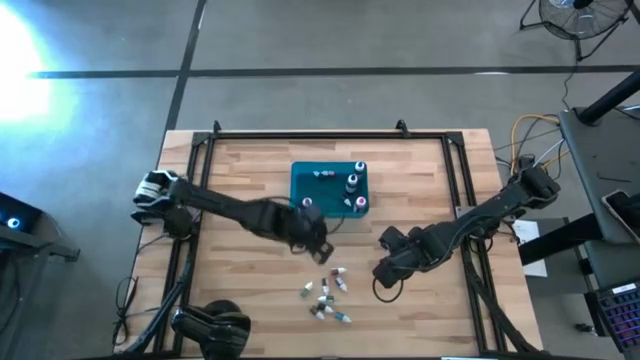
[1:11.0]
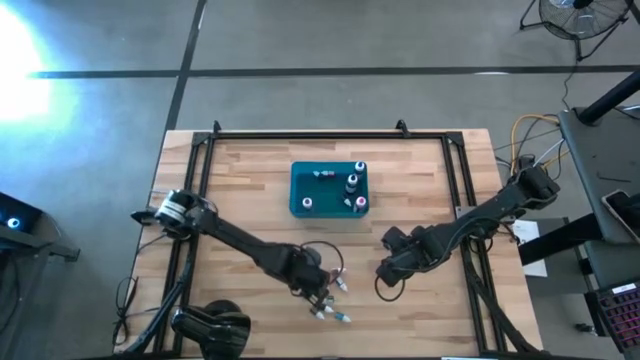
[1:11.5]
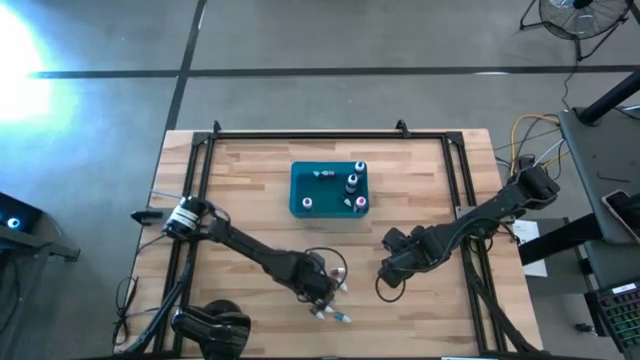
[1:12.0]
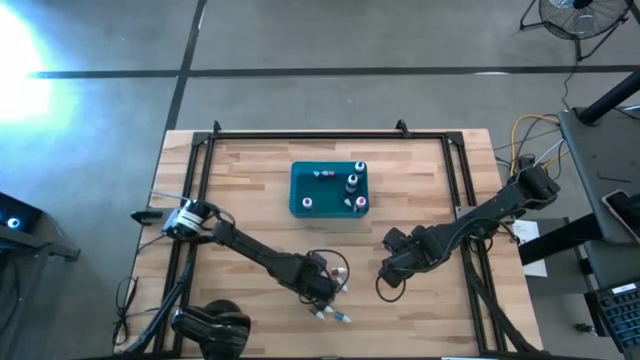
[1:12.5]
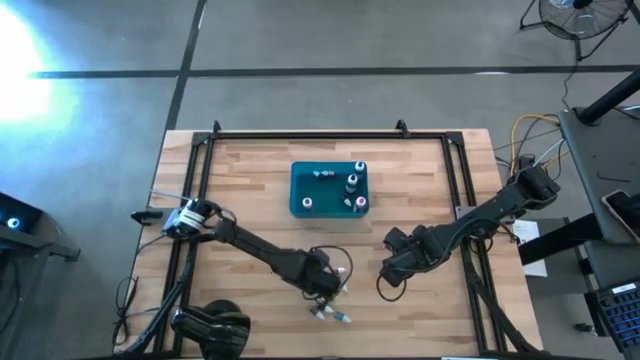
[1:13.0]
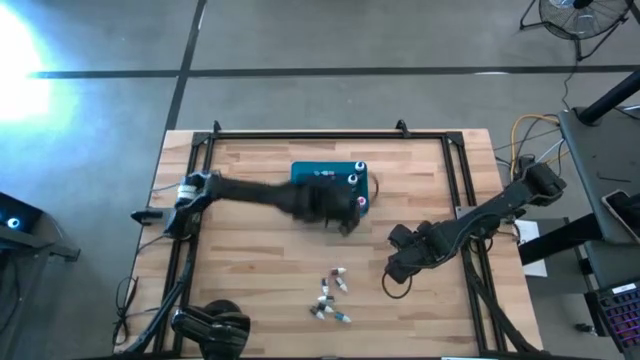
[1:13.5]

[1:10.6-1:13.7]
Task: Pick & Place food coloring
Put the green food coloring bottle in the blue bin

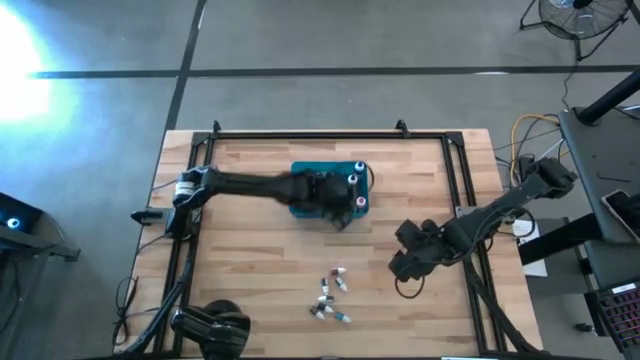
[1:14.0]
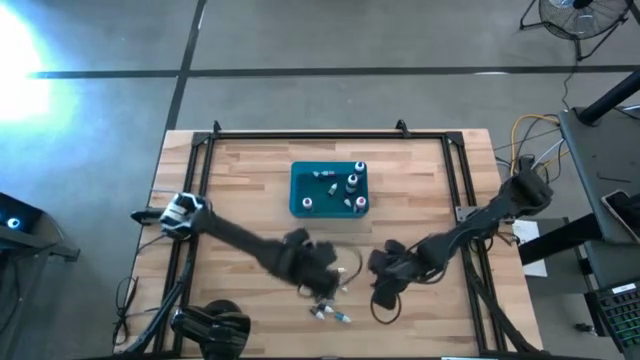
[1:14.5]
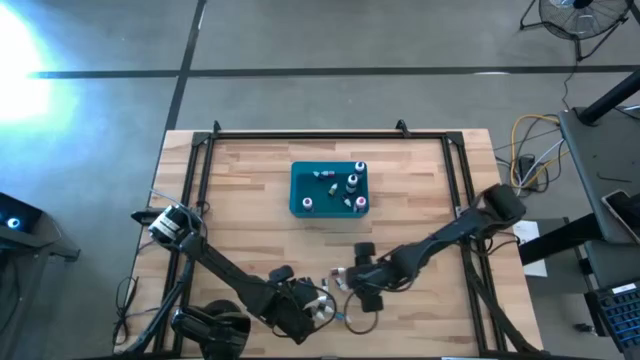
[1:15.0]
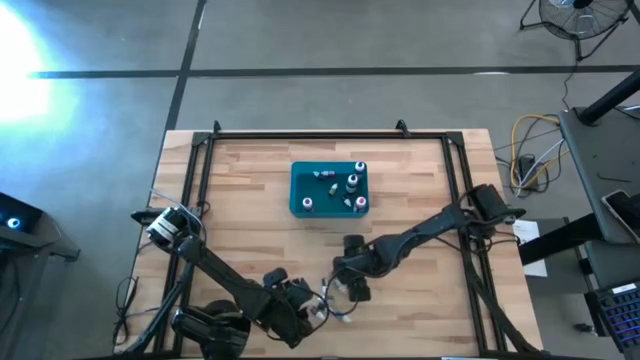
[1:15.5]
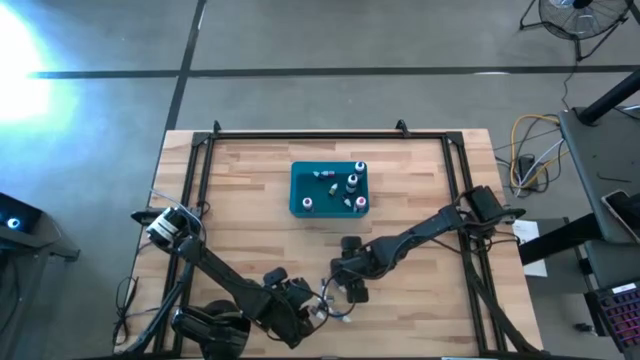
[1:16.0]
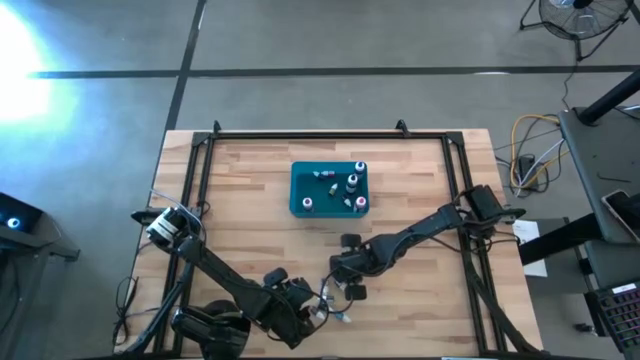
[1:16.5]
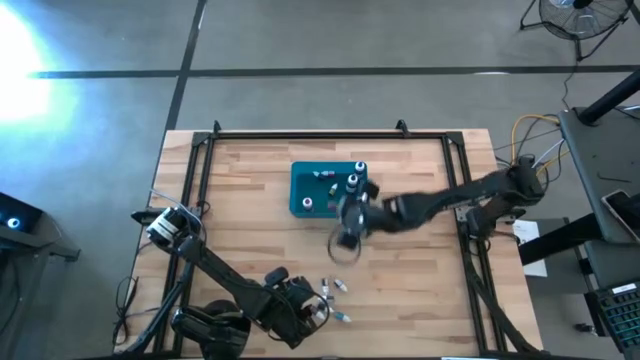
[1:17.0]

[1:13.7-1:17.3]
Put the red food coloring bottle in the blue bin

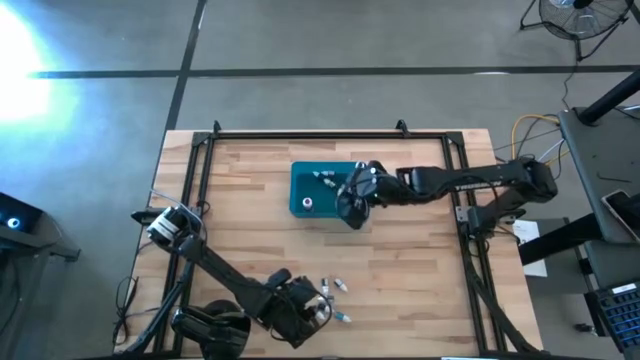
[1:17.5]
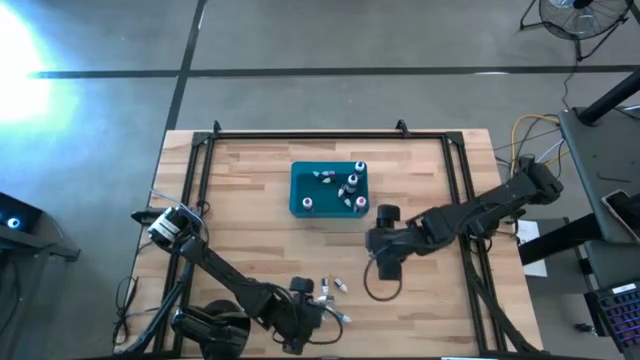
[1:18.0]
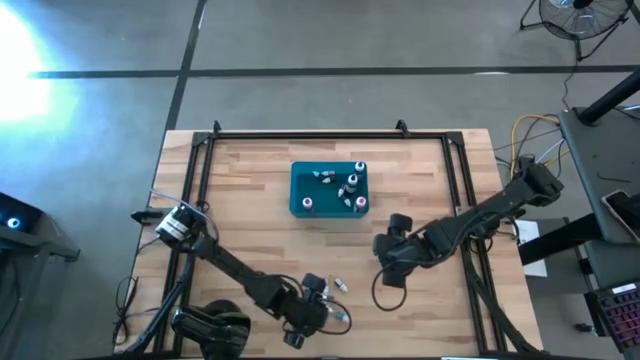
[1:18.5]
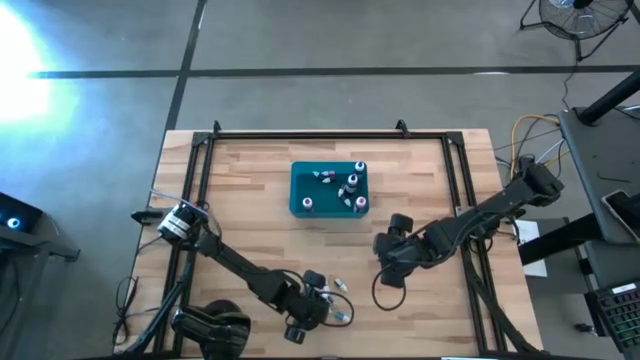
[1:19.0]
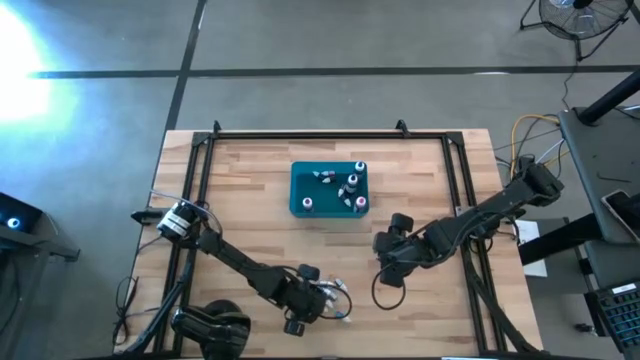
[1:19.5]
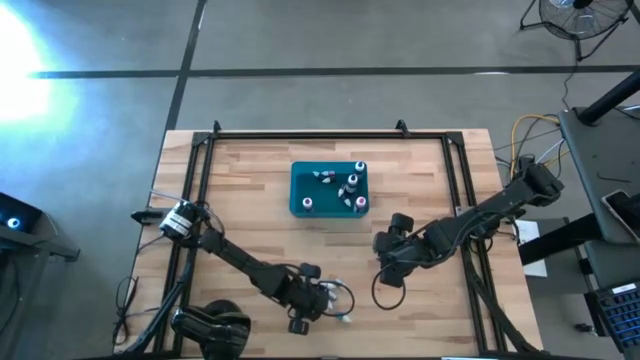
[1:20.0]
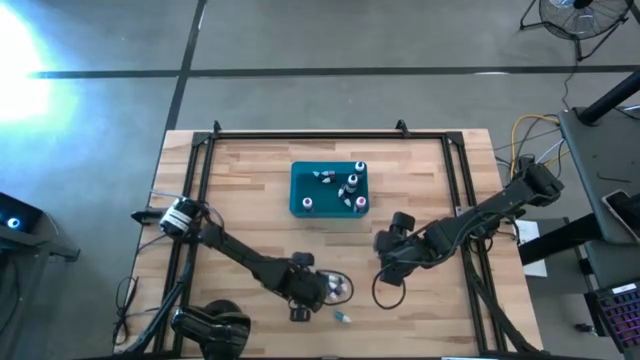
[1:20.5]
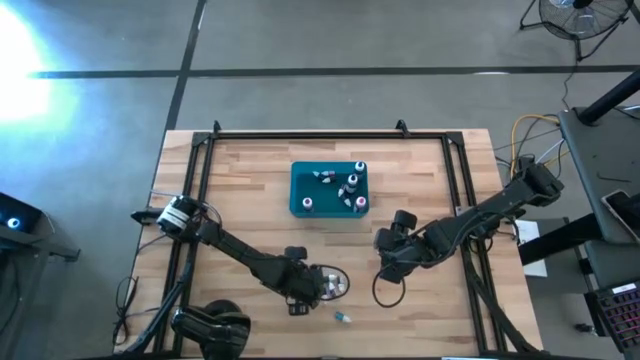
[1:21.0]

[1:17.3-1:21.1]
Put the red food coloring bottle in the blue bin

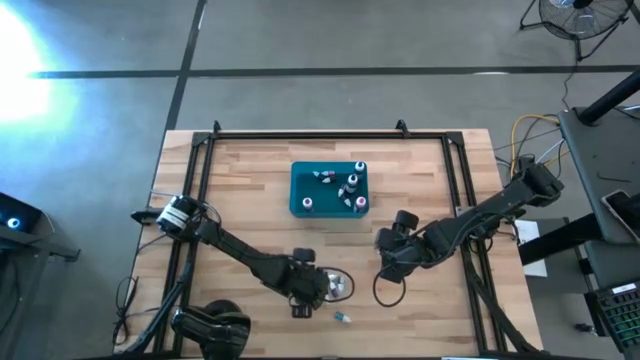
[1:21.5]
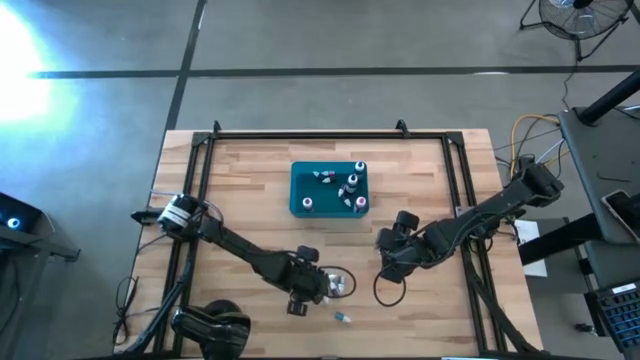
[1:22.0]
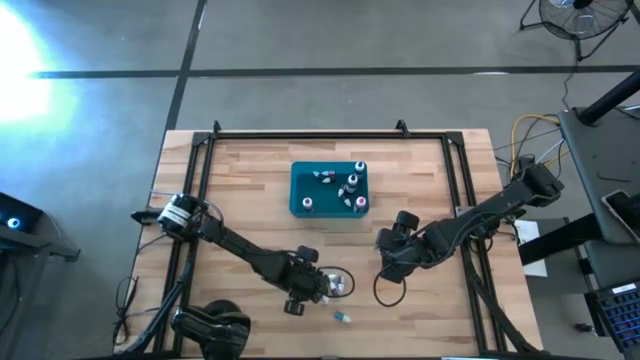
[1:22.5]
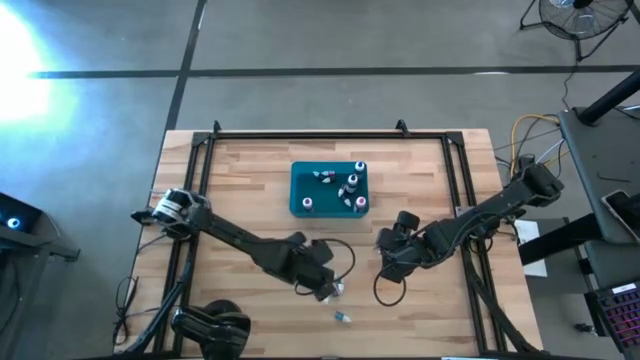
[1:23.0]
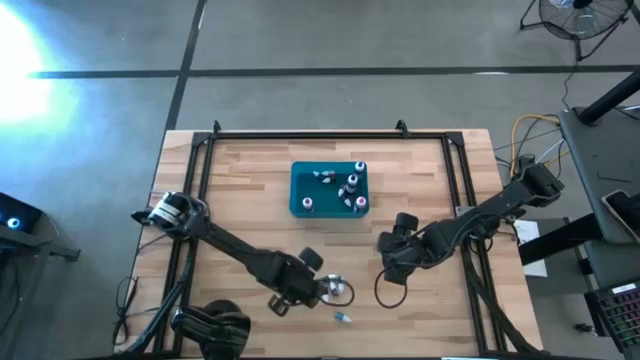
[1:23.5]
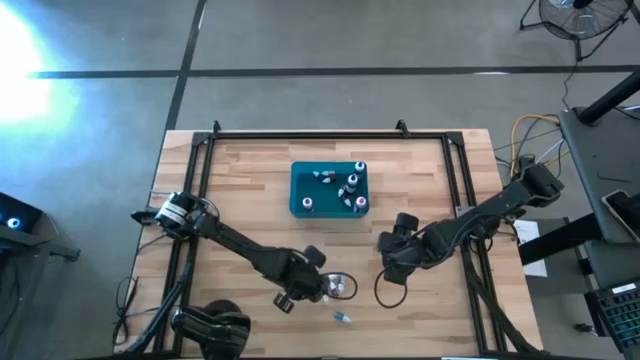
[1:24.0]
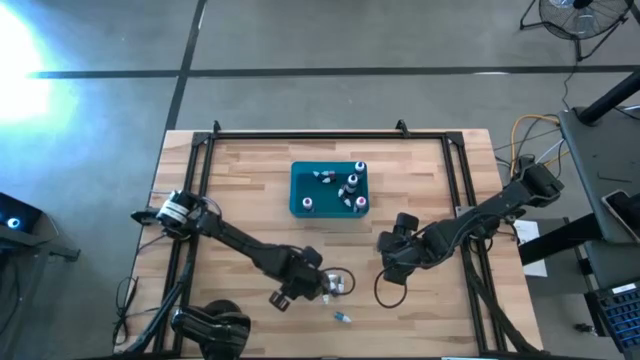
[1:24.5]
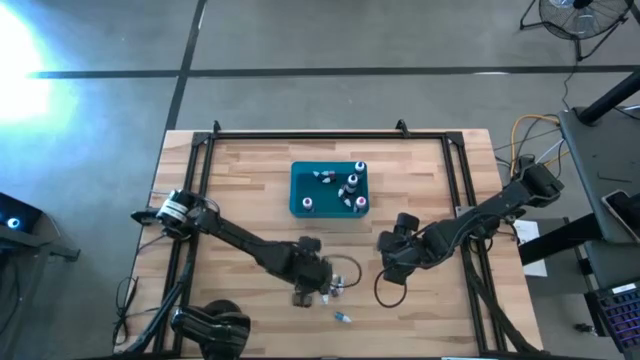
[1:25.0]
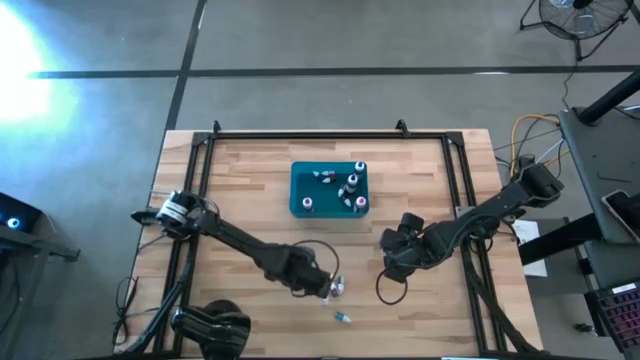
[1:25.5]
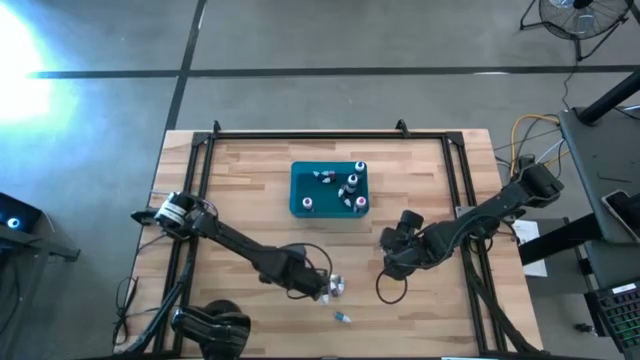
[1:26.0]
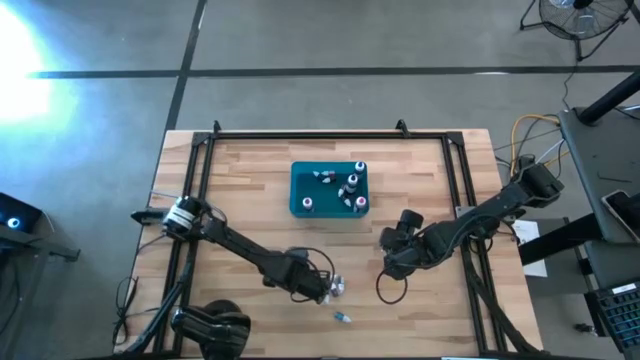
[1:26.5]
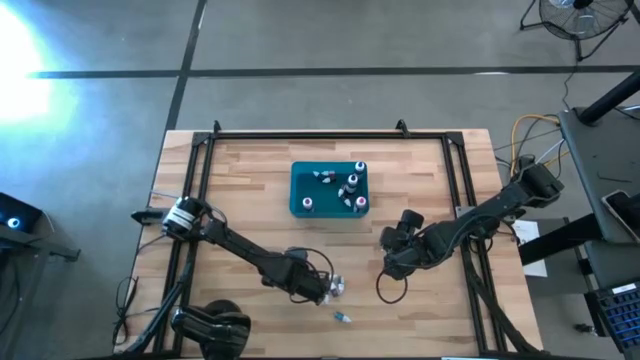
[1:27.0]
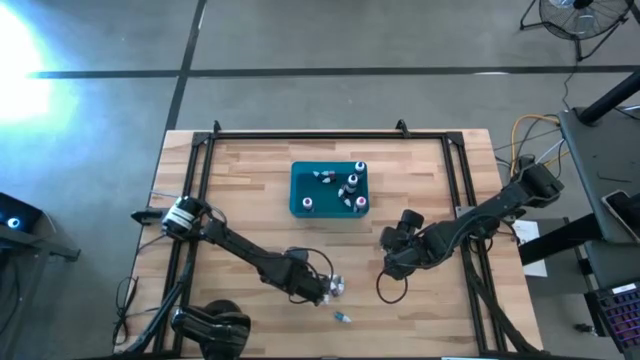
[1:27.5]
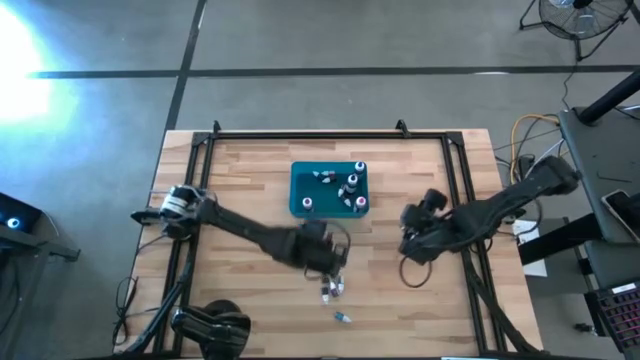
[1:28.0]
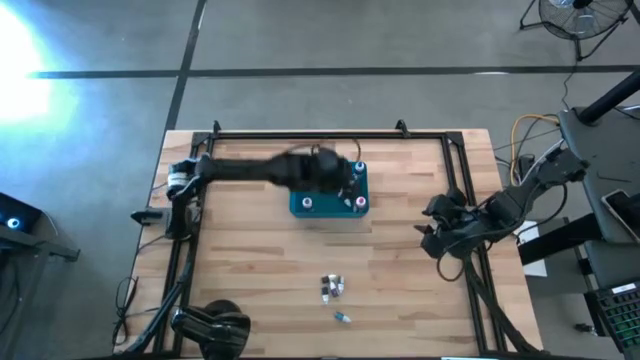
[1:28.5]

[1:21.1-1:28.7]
Put the red food coloring bottle into the bin

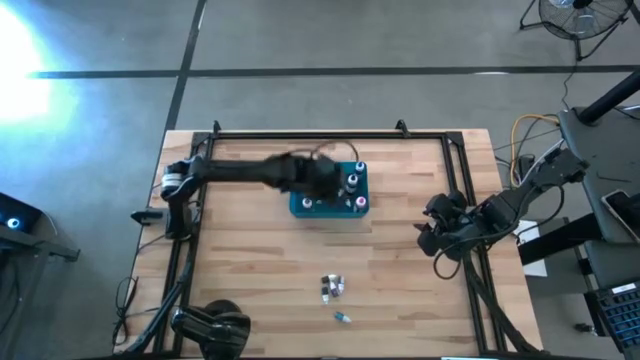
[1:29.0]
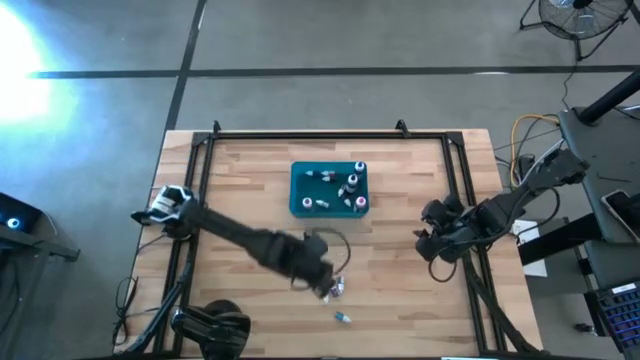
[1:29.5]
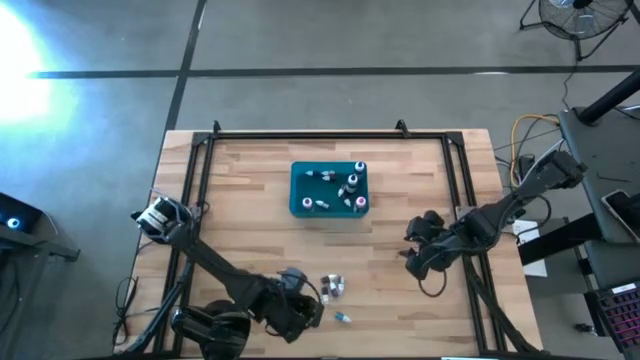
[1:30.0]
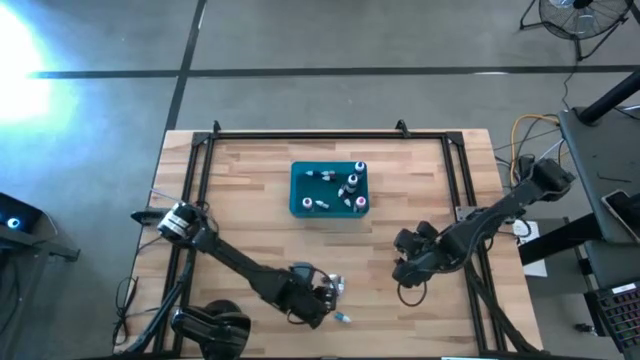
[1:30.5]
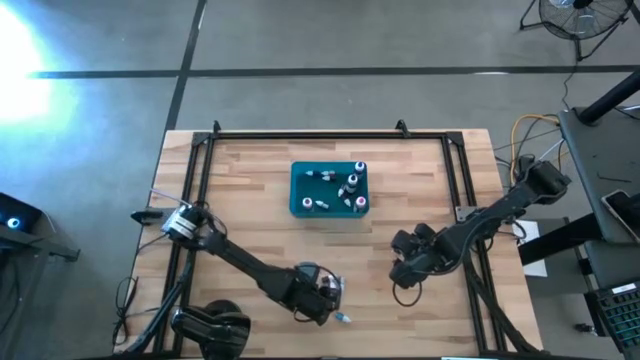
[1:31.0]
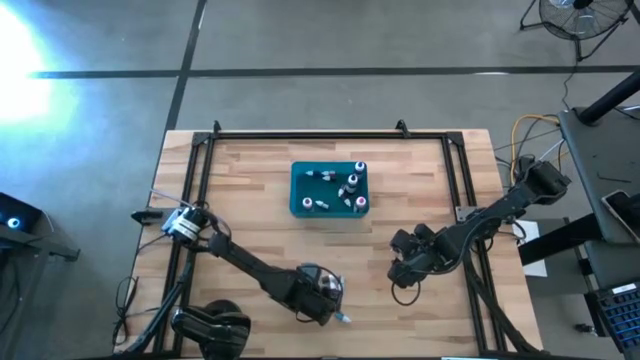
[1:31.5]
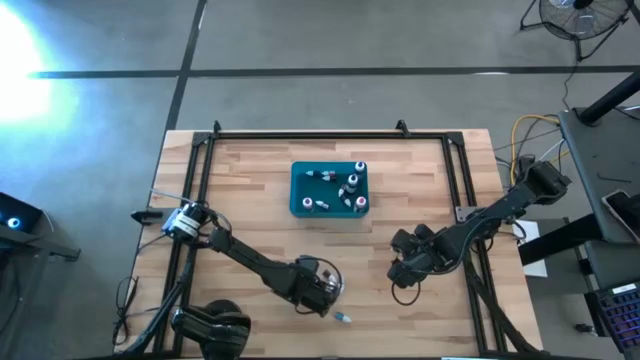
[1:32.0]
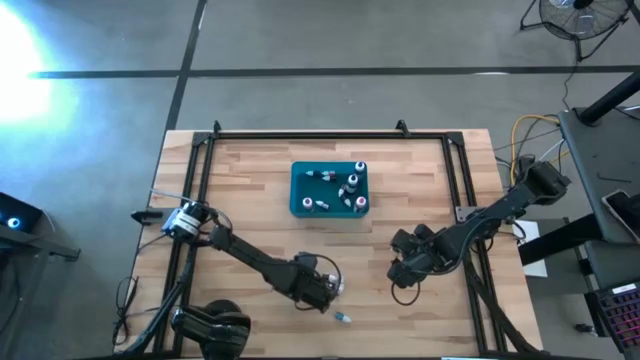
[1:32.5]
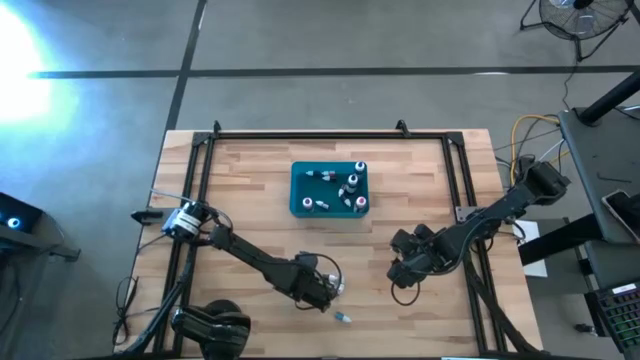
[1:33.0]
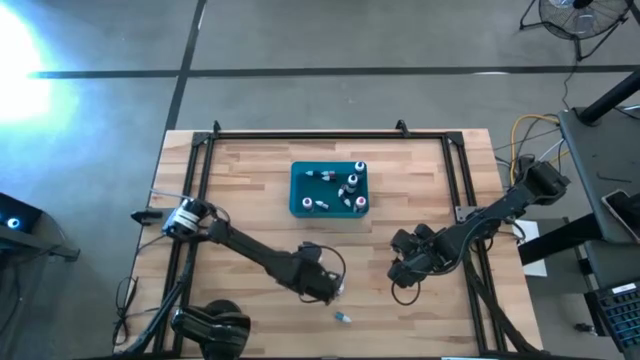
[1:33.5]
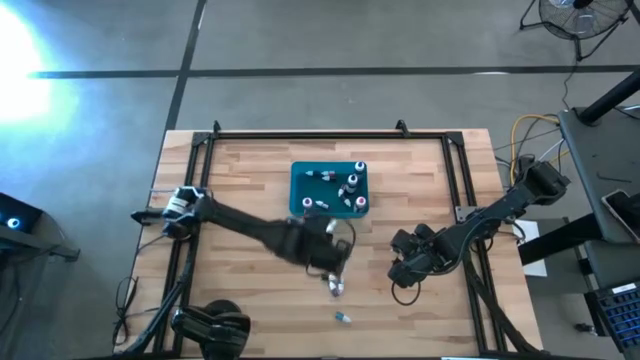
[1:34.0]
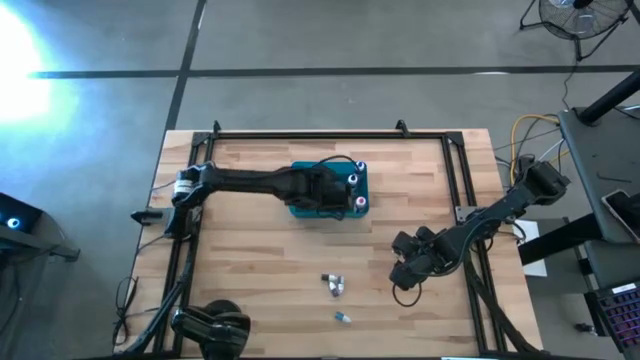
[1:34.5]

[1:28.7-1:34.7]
Put the green food coloring bottle into the blue bin
